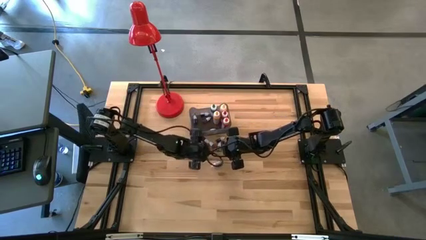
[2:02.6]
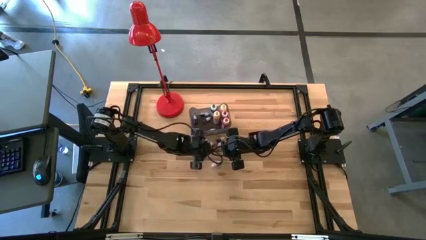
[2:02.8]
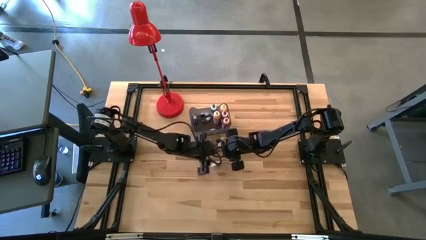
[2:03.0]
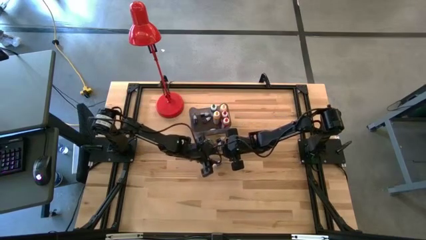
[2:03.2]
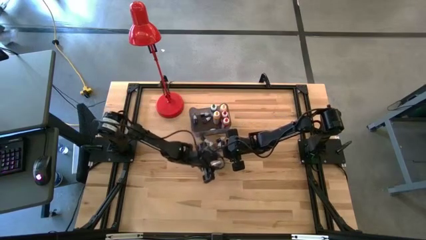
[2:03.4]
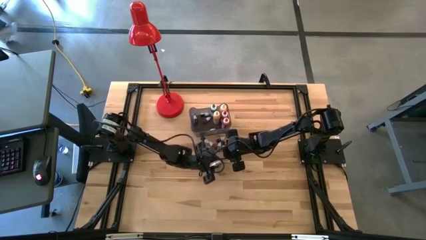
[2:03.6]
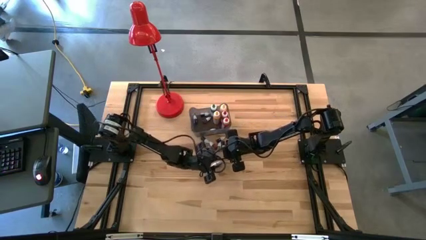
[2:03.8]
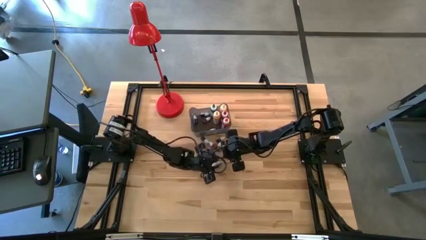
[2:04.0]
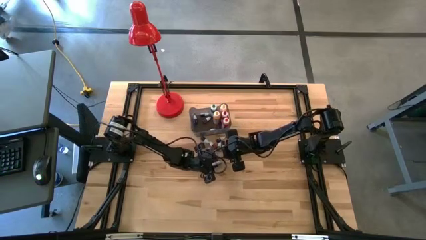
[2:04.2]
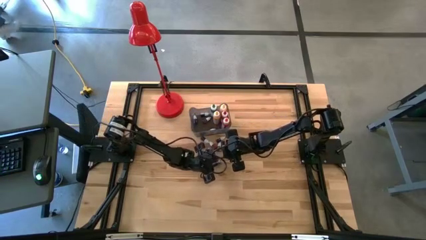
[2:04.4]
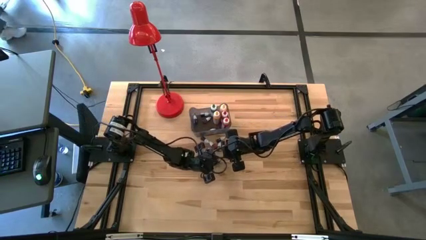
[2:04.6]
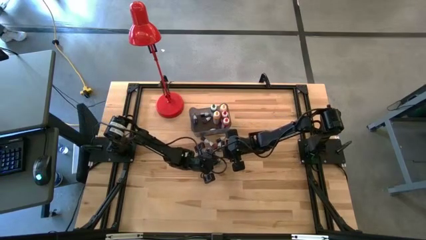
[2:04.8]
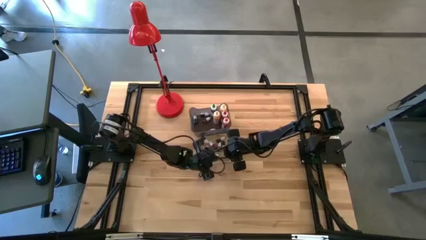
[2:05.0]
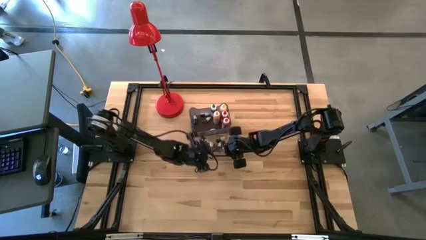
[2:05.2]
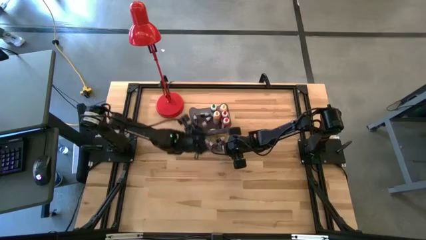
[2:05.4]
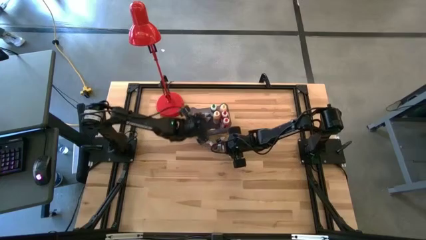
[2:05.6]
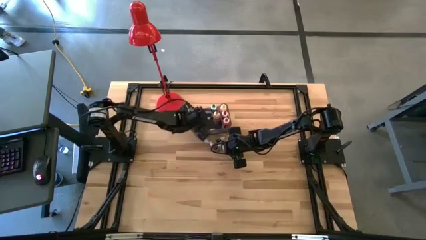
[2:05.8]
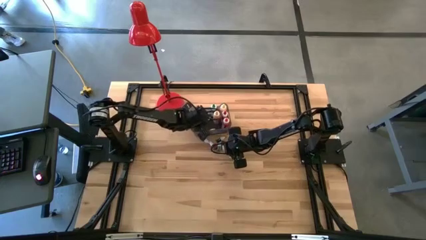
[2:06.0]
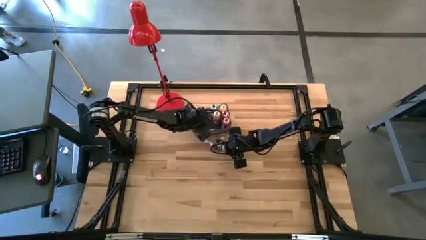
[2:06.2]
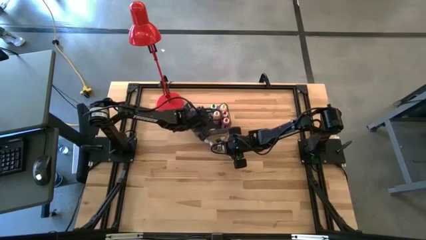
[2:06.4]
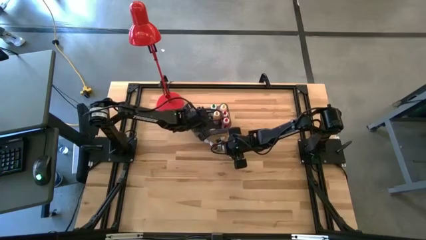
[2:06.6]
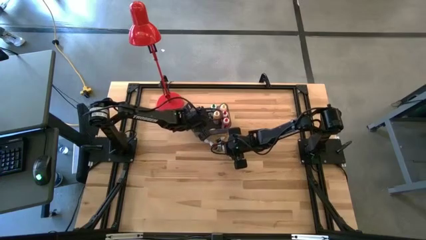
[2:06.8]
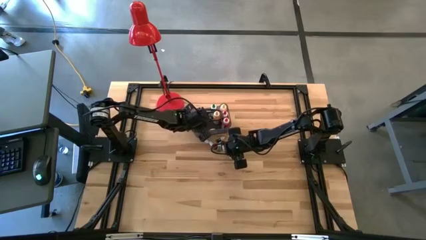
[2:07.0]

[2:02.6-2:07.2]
Task: Pick & Place food coloring
Put the bottom small black food coloring bottle into the bin

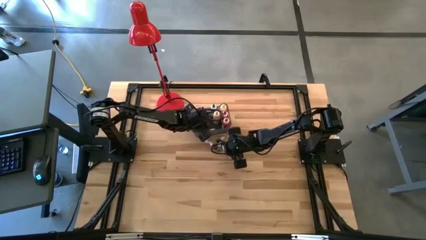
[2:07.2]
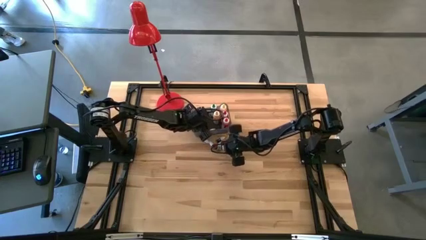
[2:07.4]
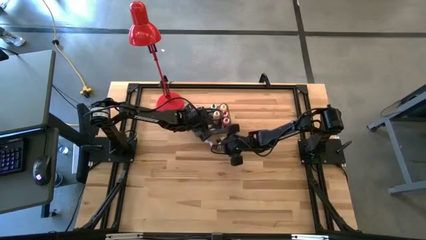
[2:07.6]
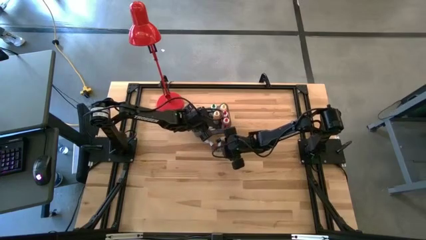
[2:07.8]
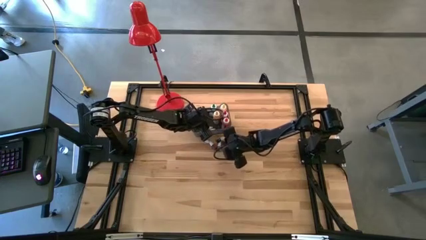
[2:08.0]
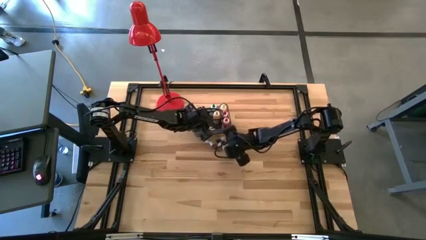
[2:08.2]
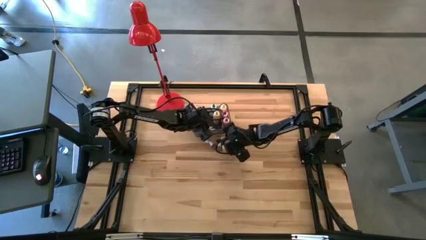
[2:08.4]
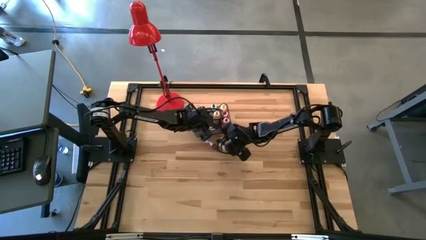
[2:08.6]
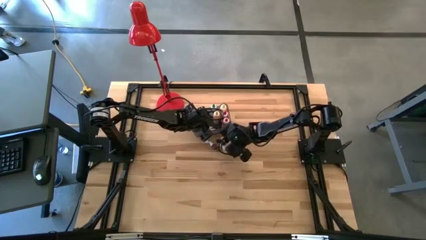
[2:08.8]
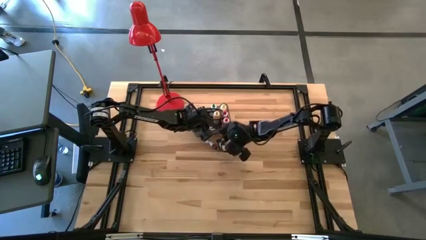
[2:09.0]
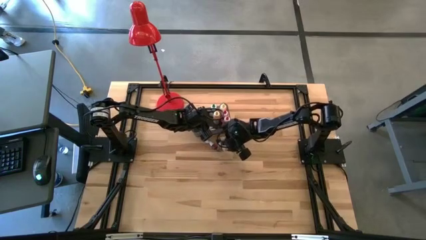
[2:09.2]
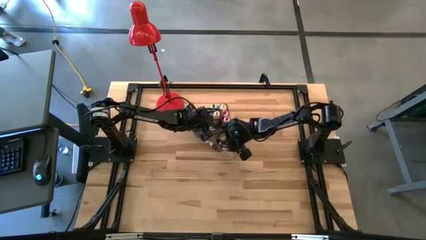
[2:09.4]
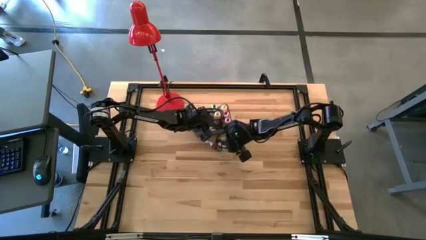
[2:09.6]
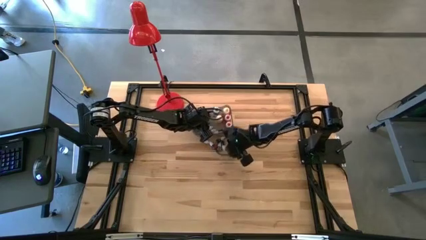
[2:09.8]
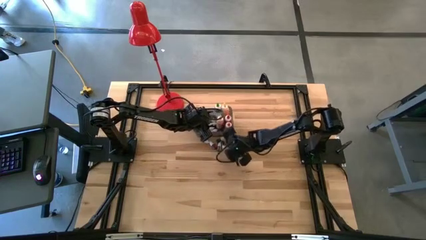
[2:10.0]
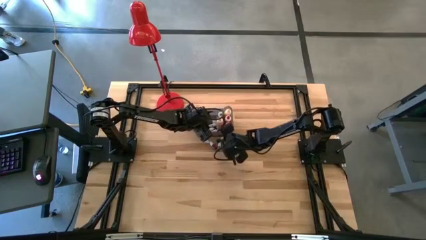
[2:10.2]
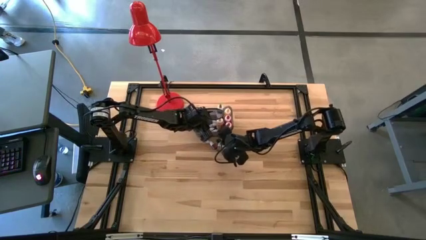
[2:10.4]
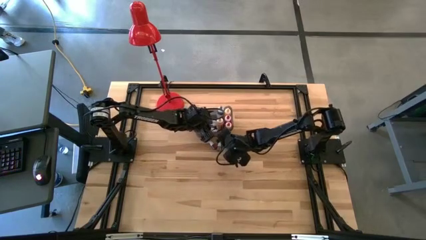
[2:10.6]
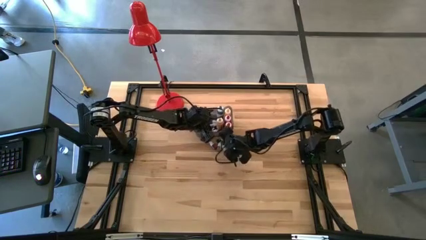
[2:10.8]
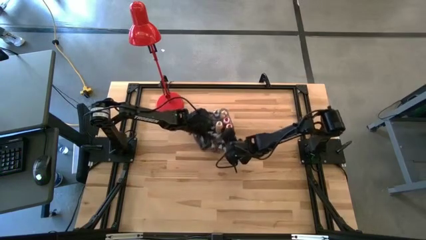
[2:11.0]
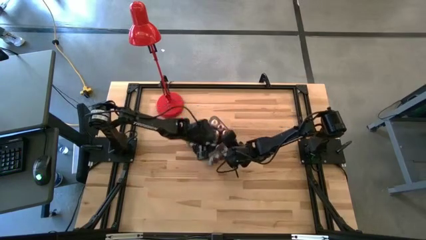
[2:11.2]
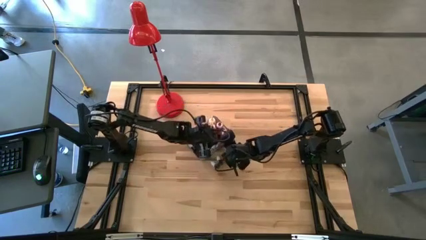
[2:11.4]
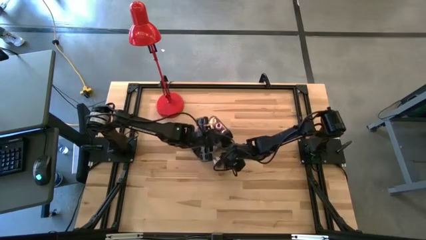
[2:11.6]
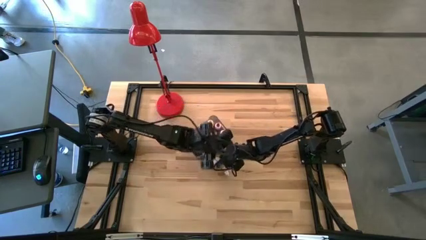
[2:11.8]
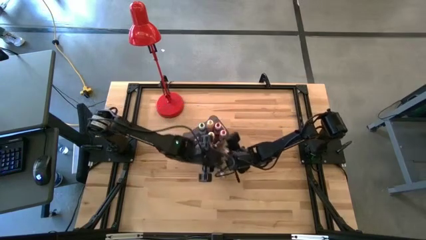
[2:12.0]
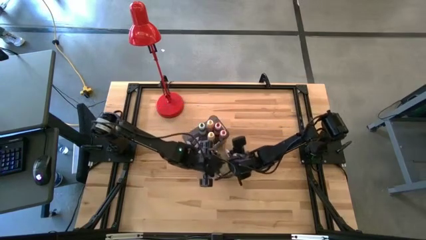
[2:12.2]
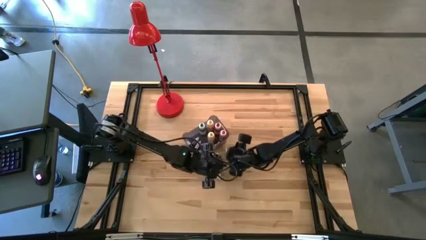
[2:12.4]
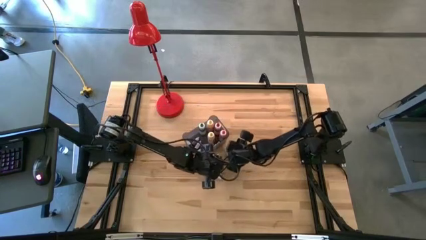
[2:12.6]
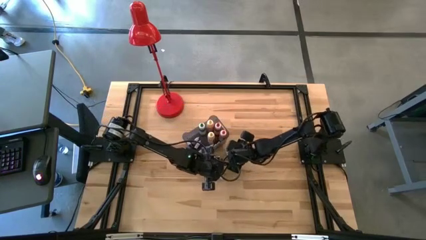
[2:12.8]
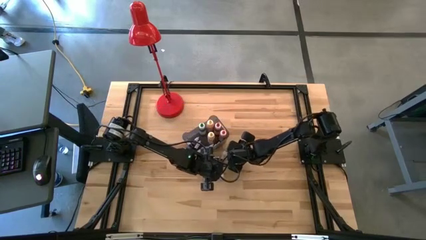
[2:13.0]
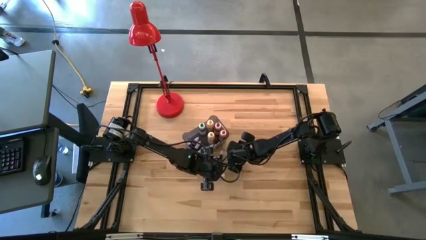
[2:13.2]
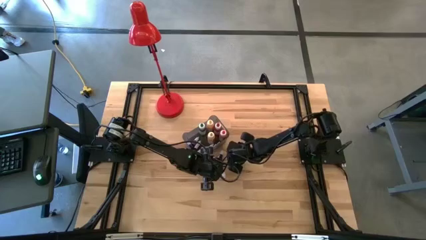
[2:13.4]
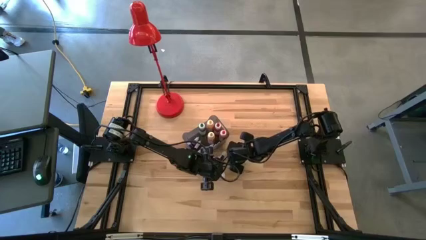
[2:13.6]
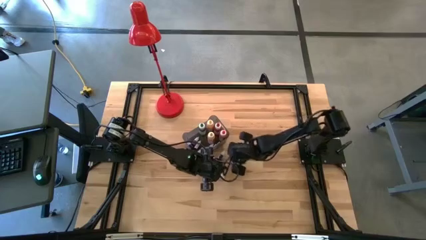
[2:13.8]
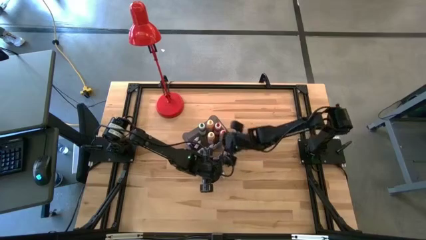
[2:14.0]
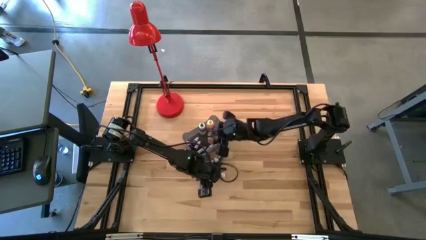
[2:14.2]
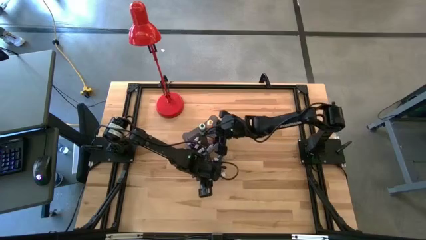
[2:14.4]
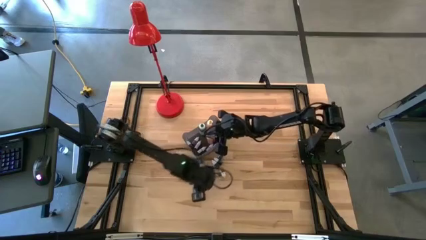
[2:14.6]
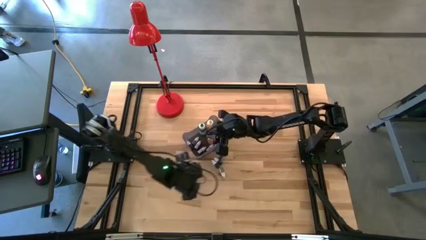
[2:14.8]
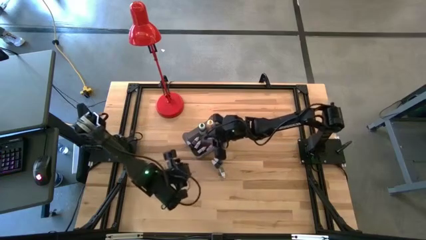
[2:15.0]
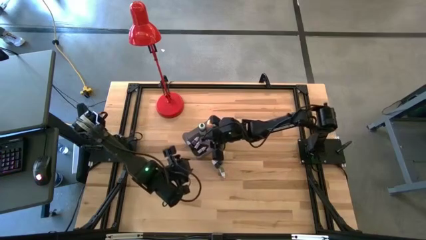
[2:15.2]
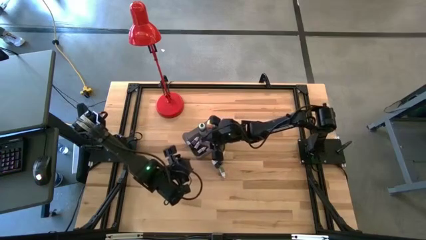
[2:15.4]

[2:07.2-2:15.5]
Put the small red food coloring bottle into the bin

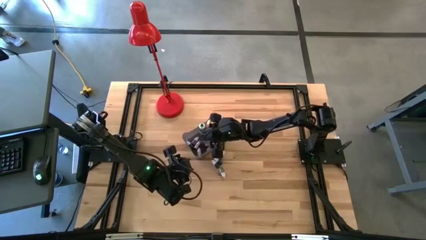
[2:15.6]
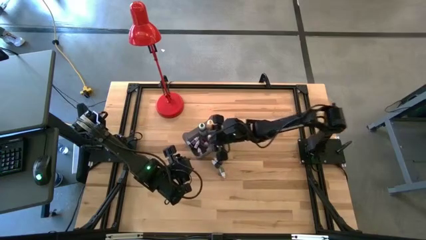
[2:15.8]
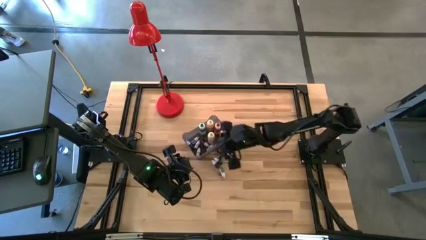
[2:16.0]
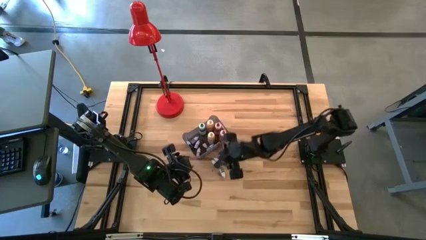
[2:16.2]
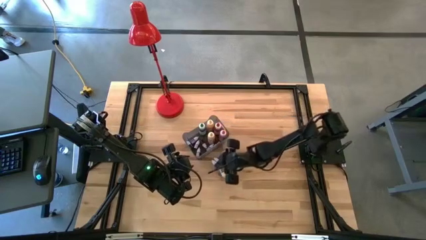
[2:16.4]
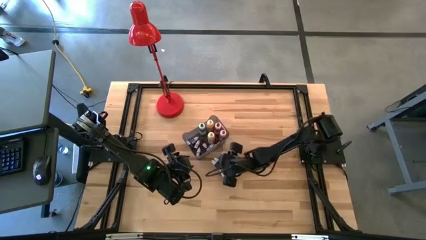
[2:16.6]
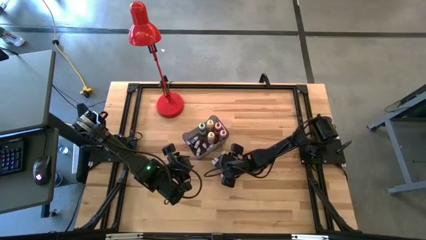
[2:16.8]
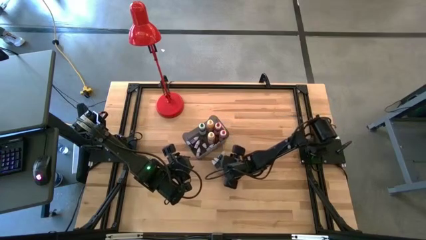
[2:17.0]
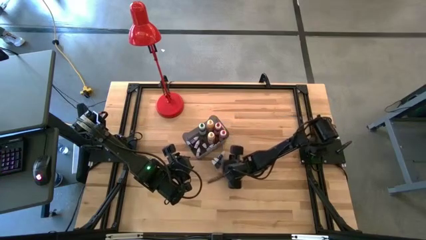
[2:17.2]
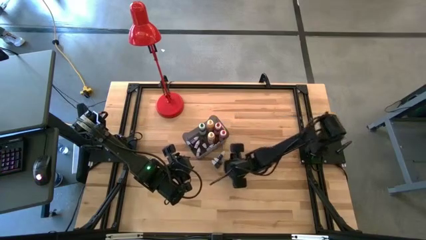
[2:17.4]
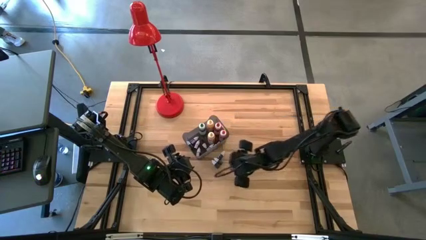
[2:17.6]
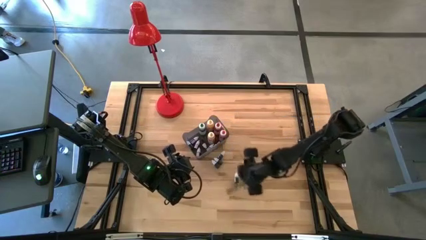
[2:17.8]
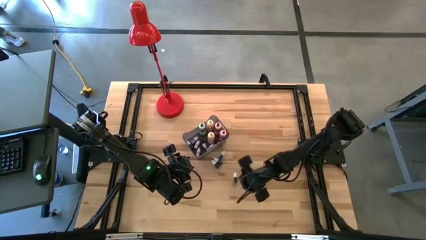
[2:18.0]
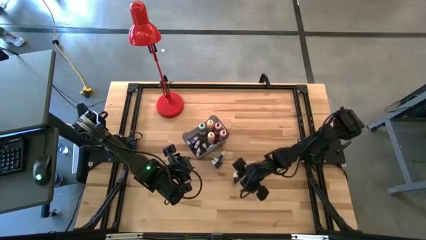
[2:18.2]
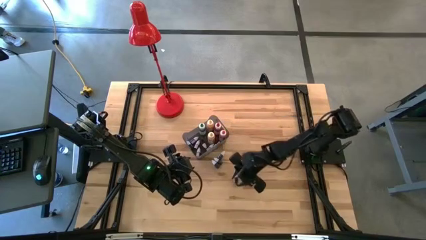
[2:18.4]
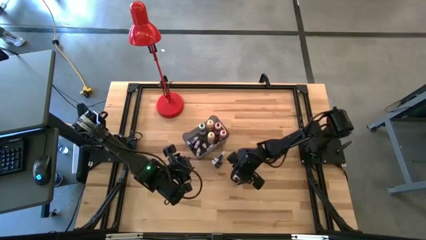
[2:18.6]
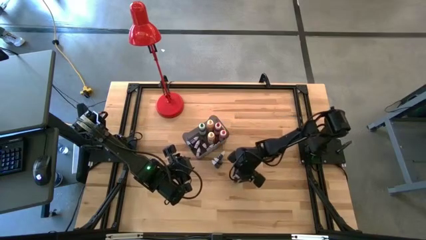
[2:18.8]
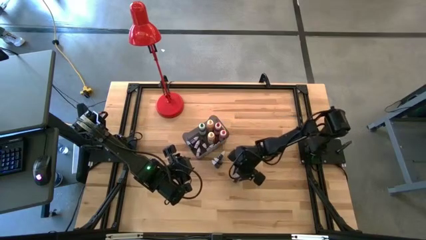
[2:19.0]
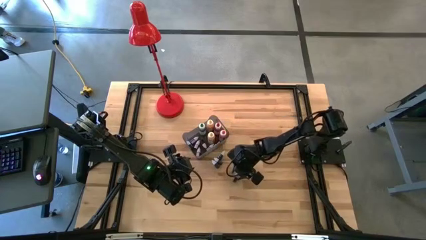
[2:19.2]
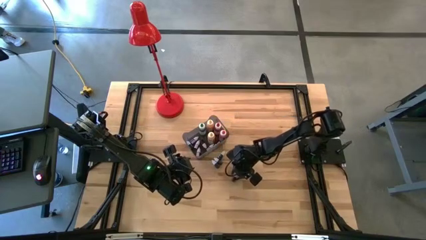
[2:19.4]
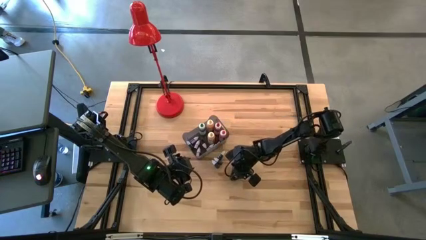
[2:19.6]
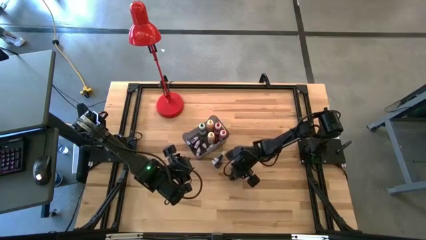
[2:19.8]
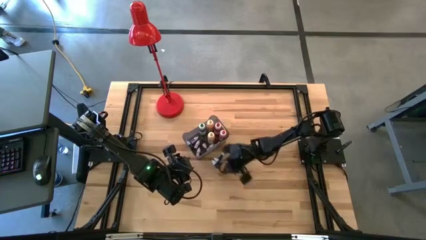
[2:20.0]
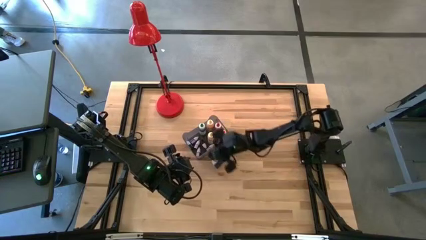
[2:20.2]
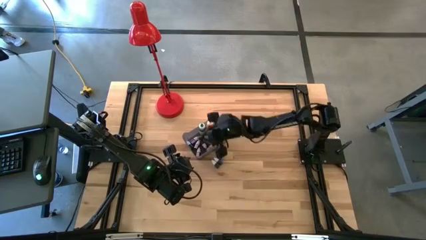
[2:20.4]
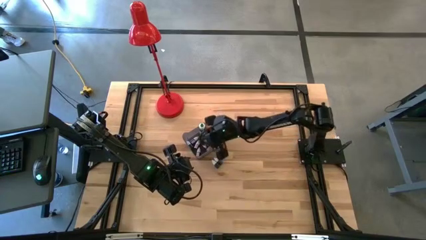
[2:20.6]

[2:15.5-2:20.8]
Put the bottom small green food coloring bottle into the bin
